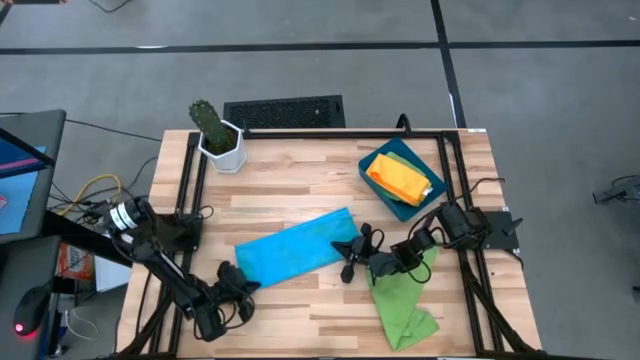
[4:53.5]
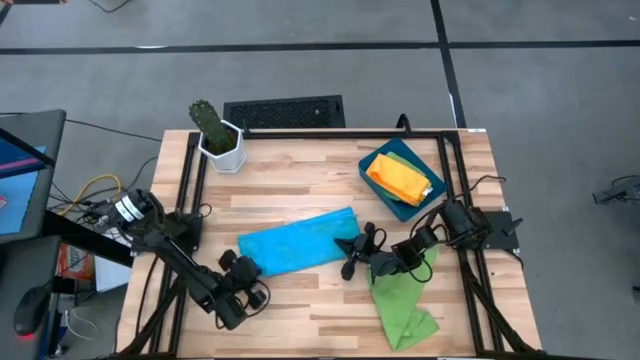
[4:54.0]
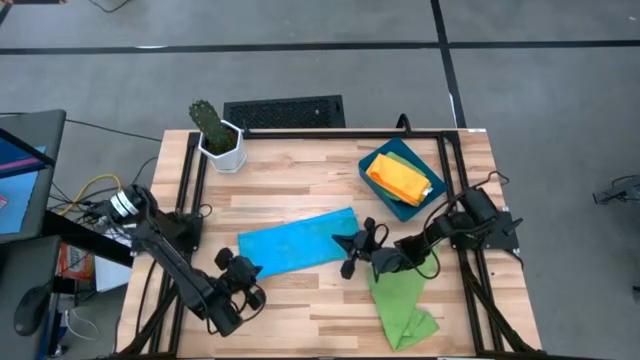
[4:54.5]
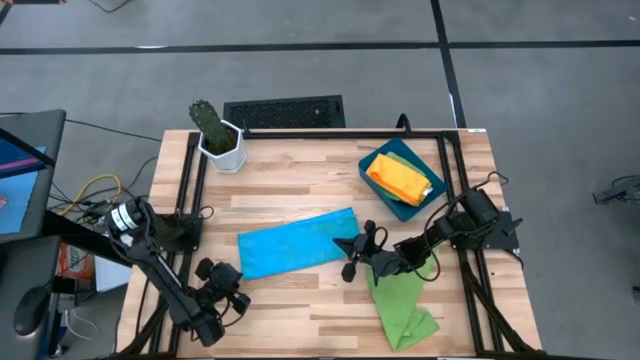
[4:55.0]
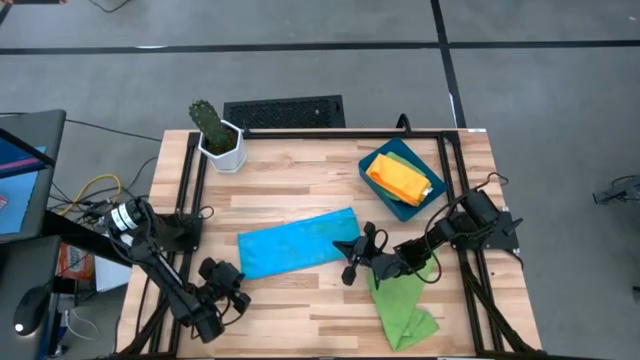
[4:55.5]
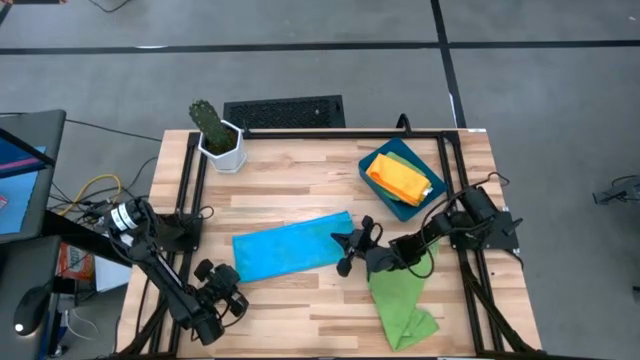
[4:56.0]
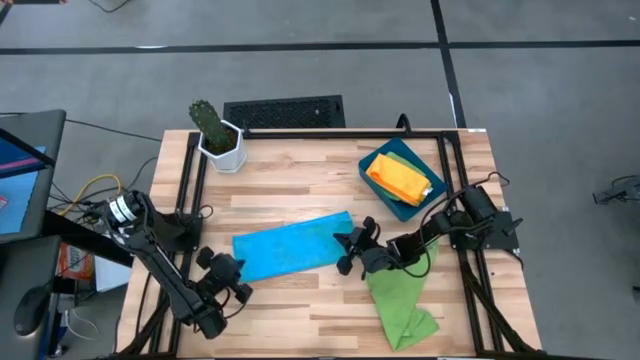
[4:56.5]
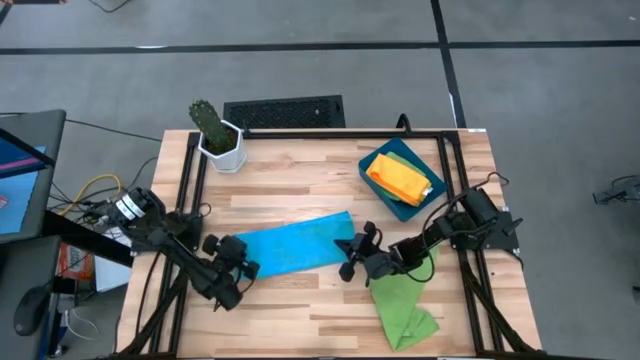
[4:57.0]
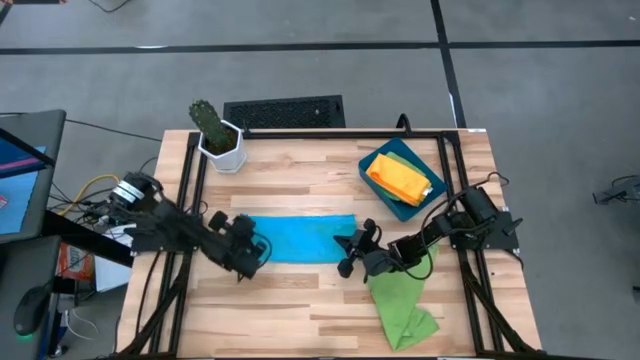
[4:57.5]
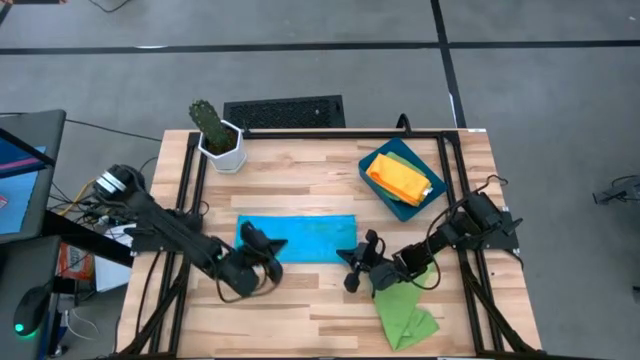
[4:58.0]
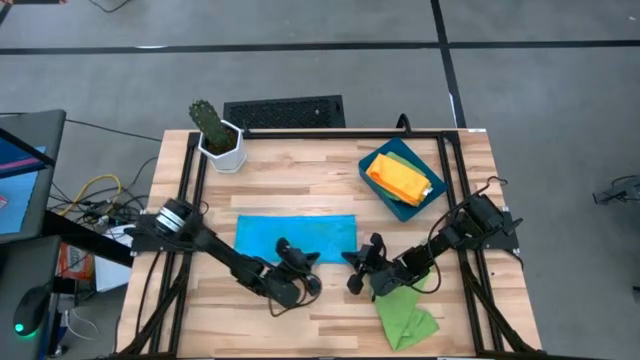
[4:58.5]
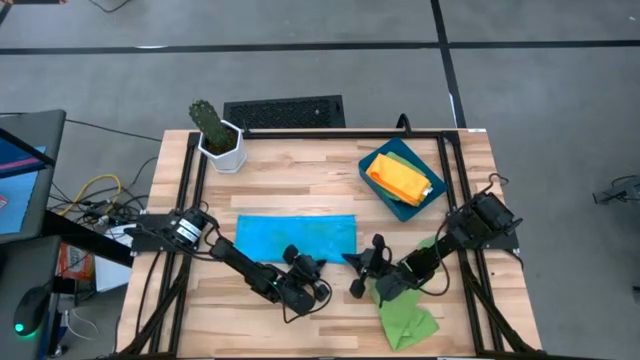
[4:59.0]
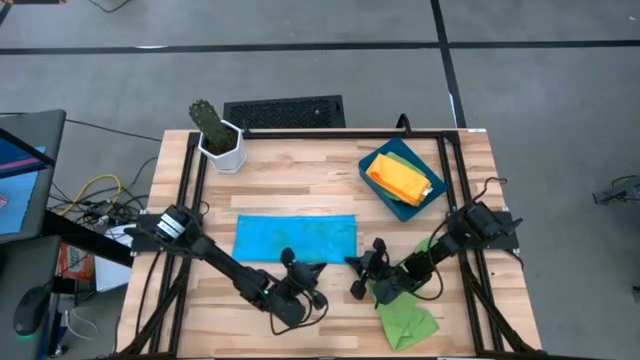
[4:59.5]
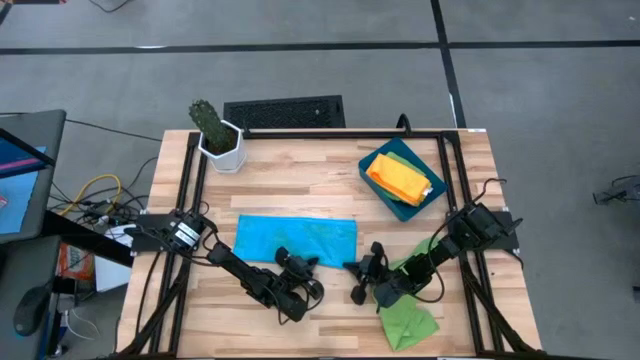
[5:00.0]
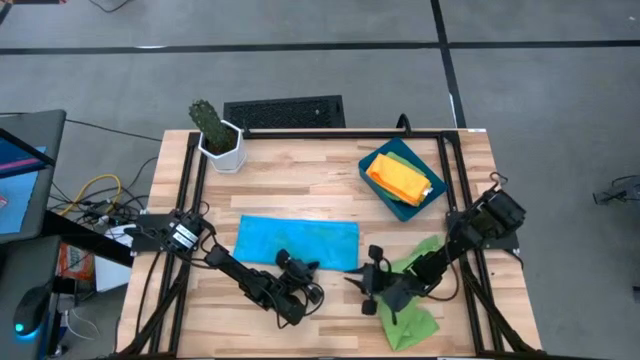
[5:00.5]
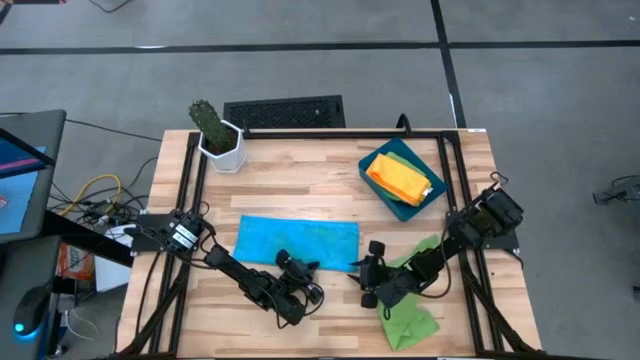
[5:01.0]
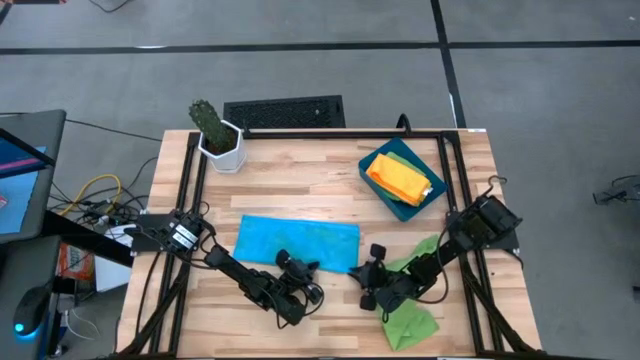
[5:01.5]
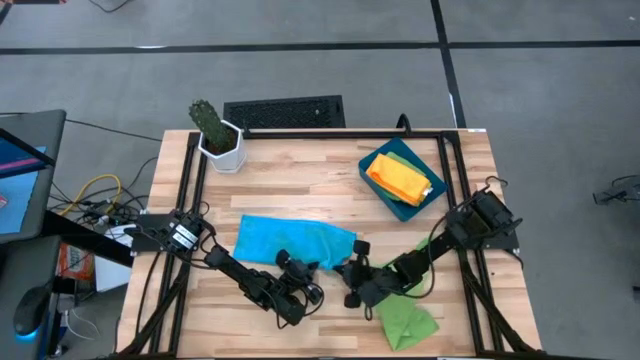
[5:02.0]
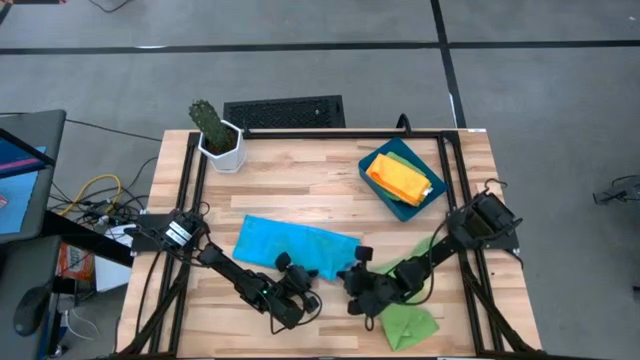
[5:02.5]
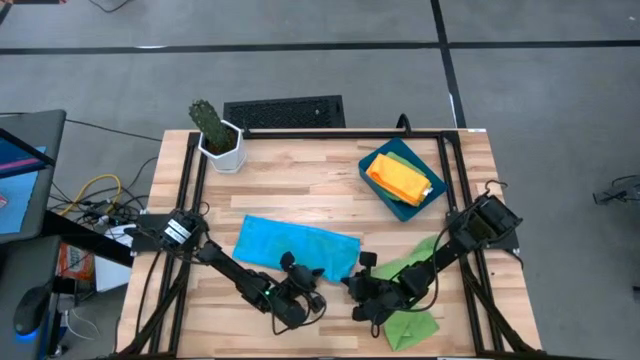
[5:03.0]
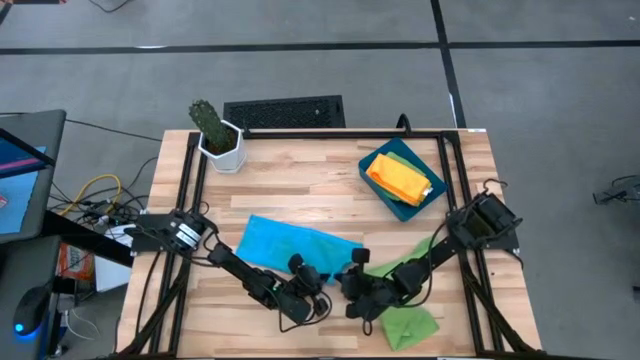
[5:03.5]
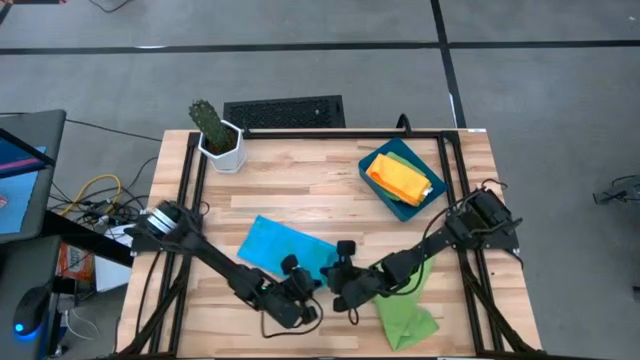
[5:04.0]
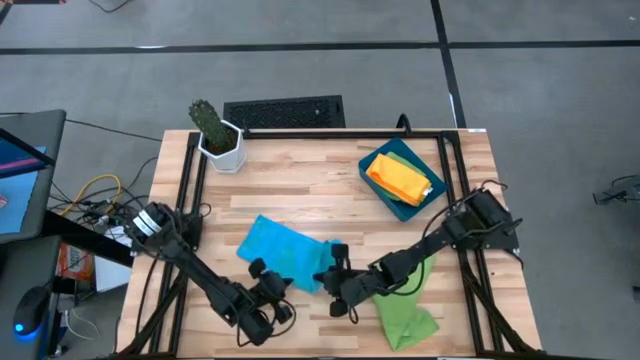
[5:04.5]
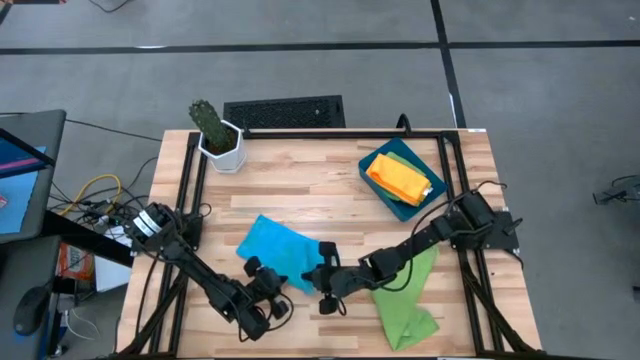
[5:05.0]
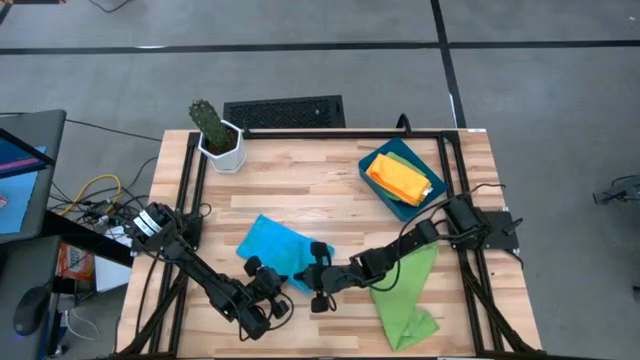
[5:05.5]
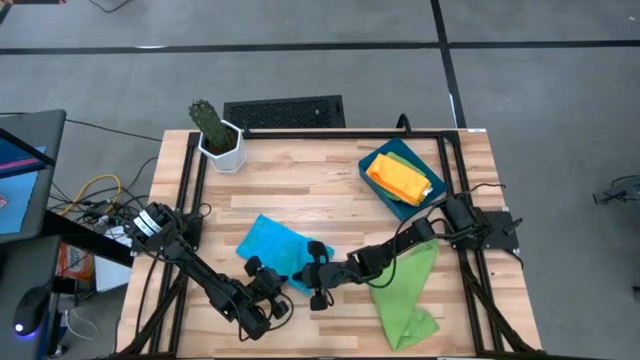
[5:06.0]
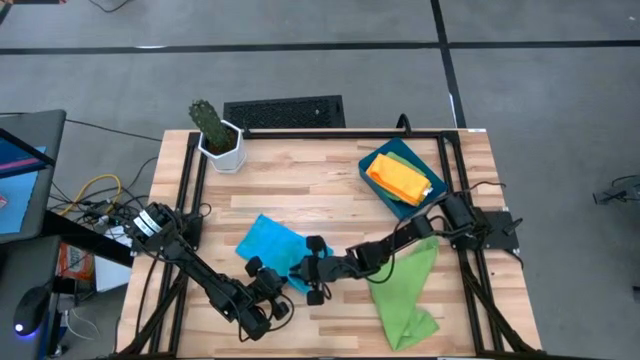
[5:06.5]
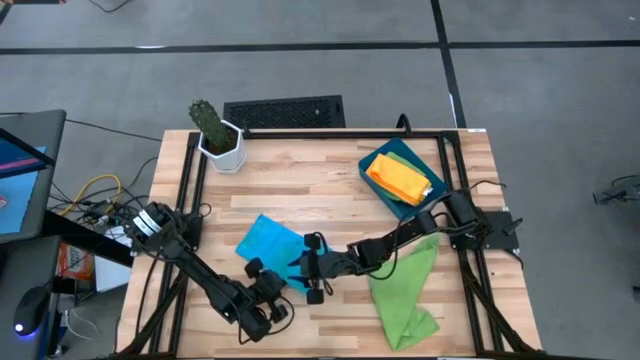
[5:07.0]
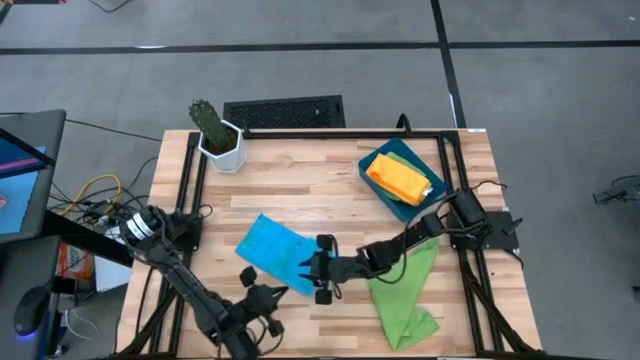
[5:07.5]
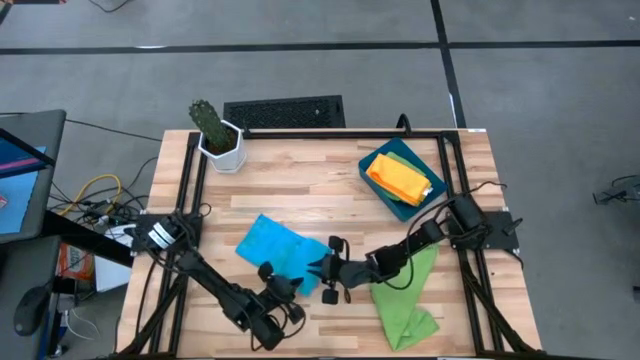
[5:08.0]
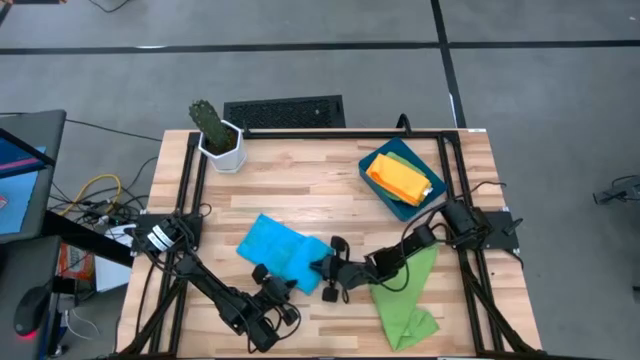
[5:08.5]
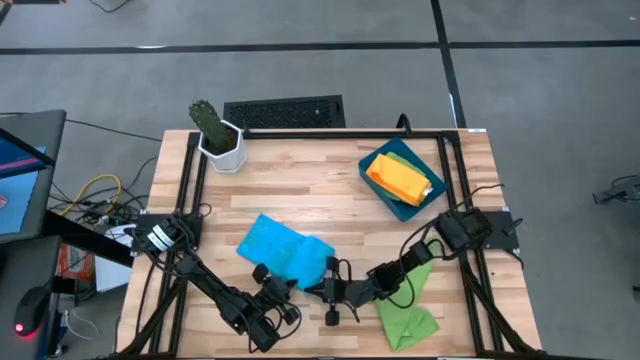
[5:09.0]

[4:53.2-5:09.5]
Task: Fold microfiber towels
Fold the blue microfiber cloth

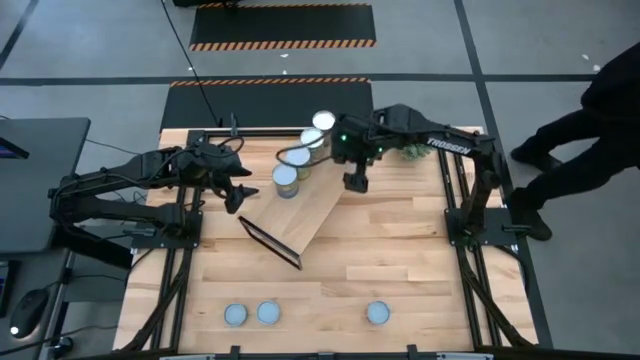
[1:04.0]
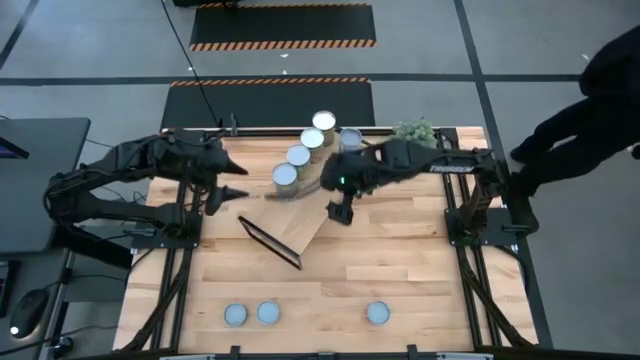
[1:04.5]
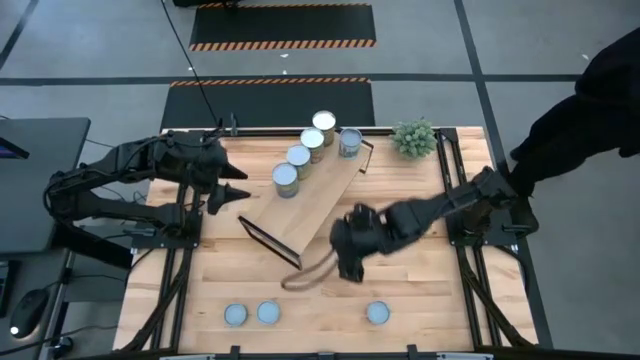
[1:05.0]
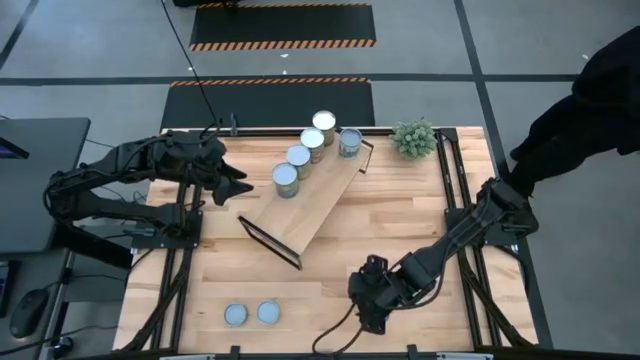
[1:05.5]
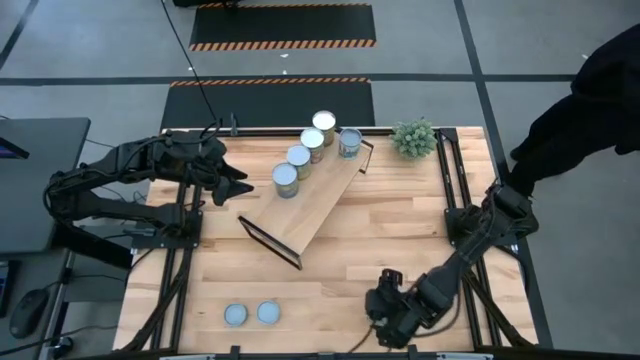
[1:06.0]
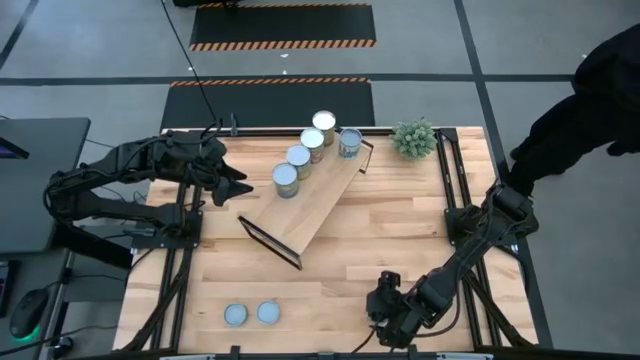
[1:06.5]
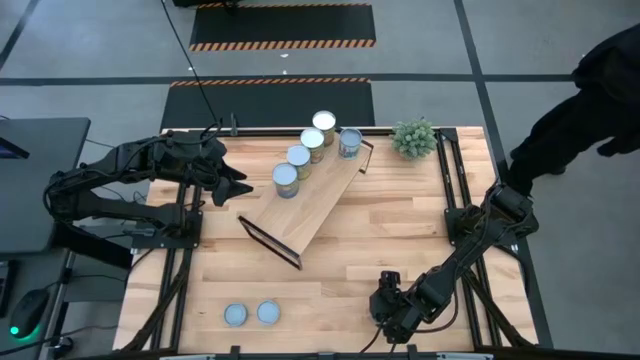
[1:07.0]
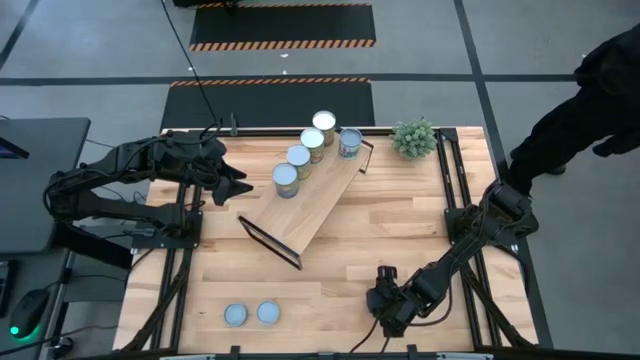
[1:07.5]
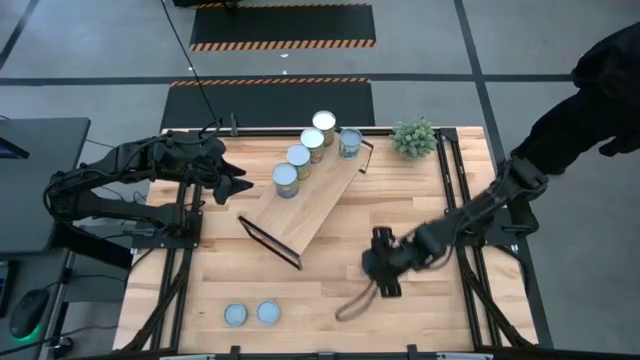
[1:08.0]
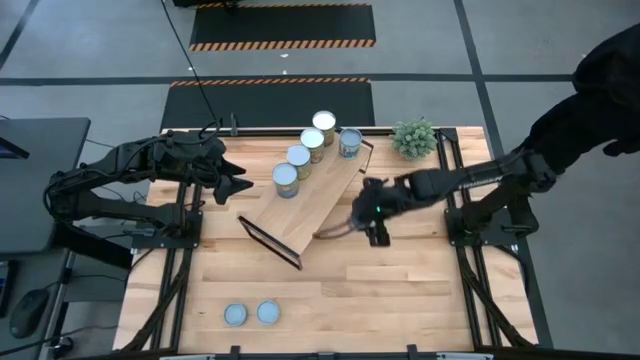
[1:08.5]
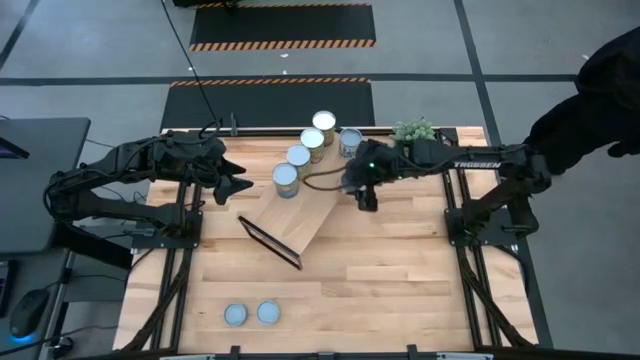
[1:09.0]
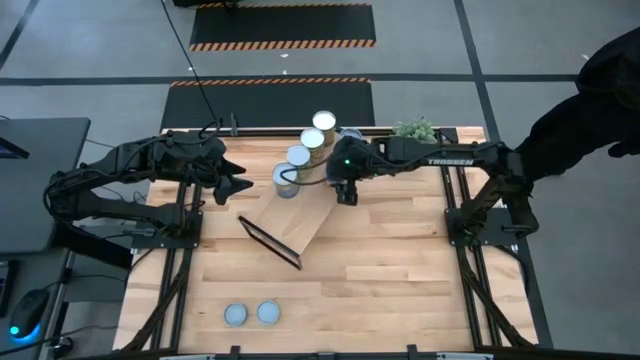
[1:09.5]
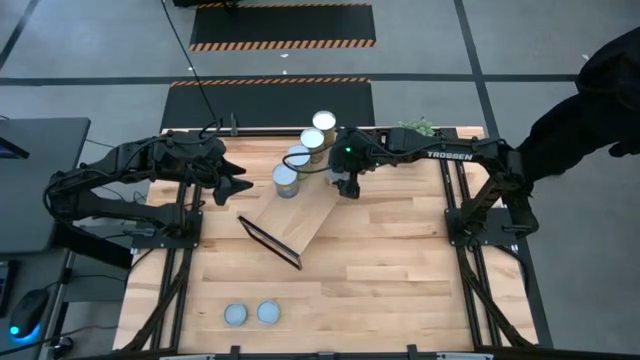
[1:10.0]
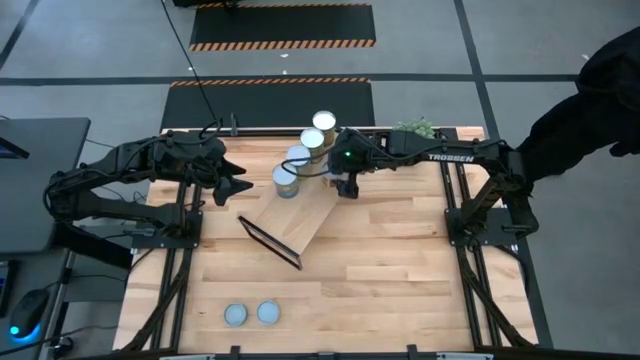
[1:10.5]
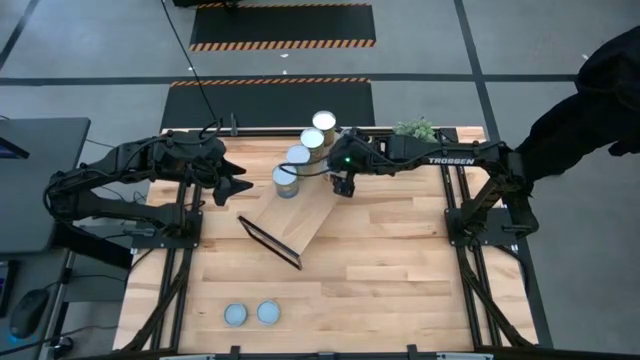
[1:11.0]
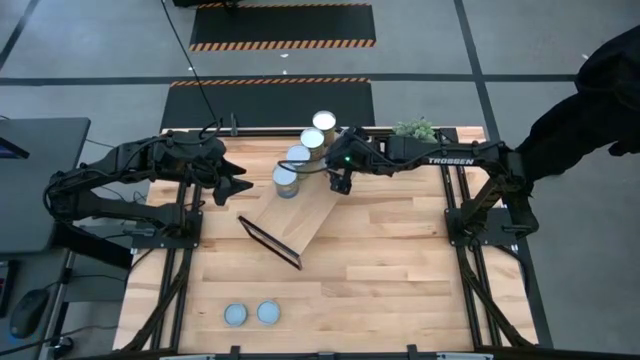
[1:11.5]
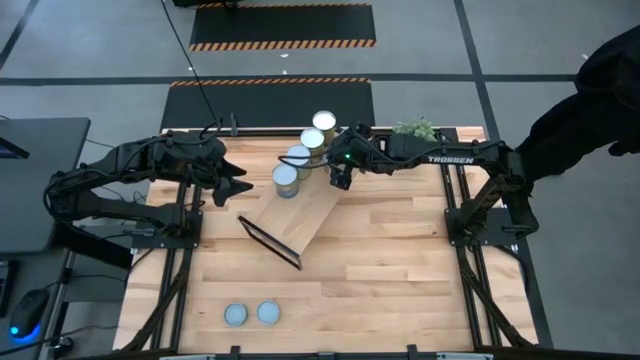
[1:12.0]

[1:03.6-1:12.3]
Task: Pick and place cans onto a shelf
Put the canned diced tomatoes on the shelf
